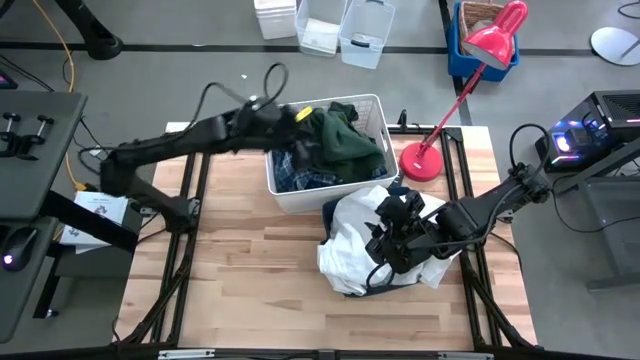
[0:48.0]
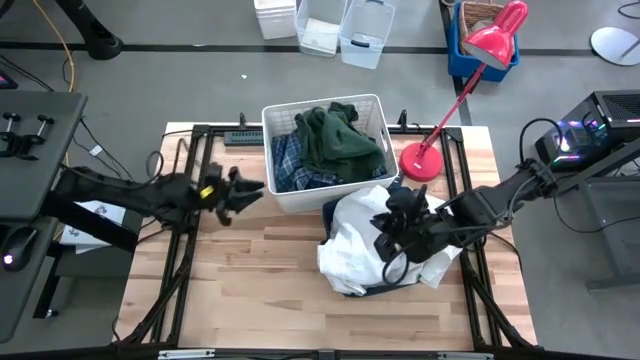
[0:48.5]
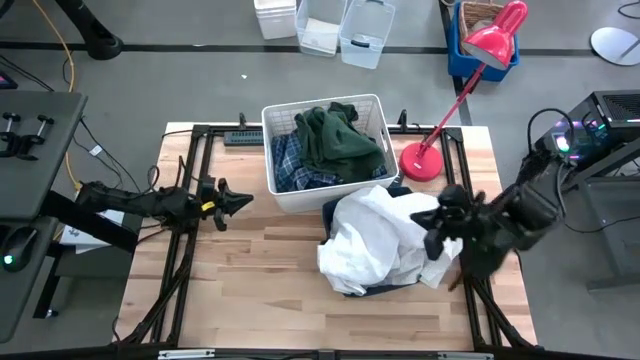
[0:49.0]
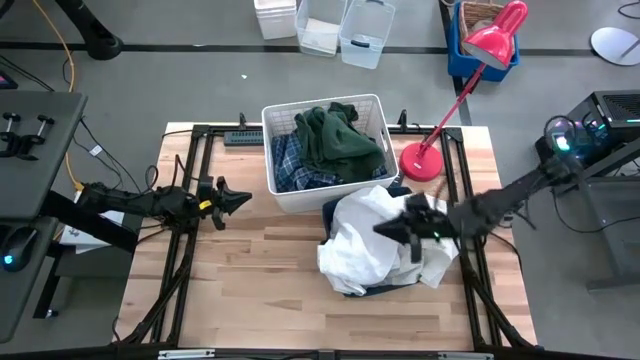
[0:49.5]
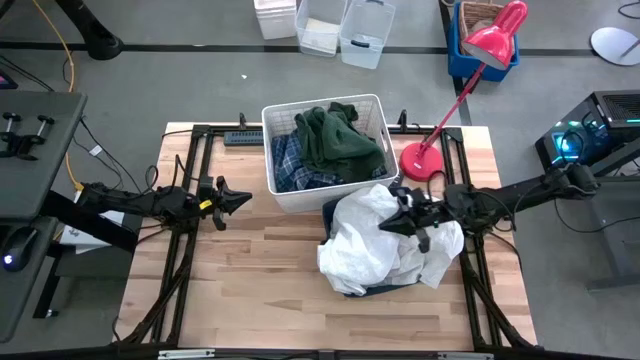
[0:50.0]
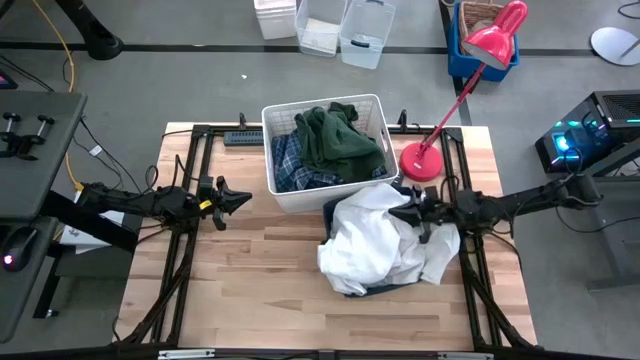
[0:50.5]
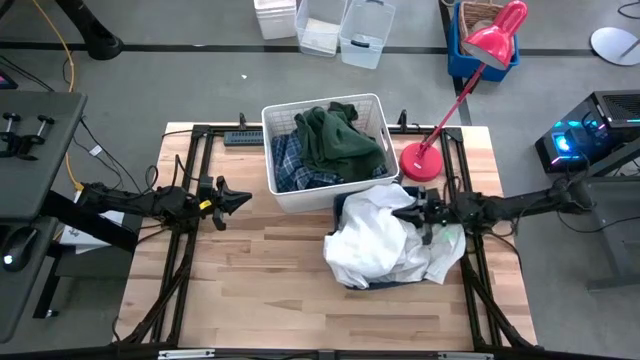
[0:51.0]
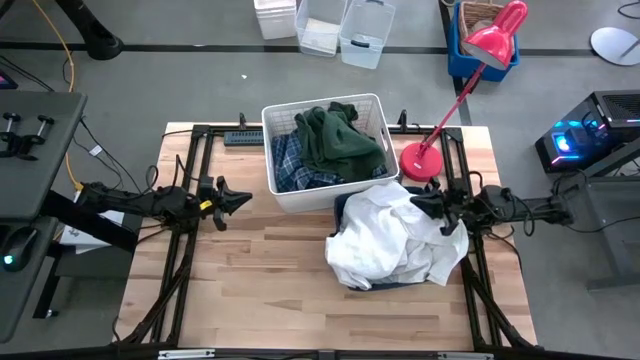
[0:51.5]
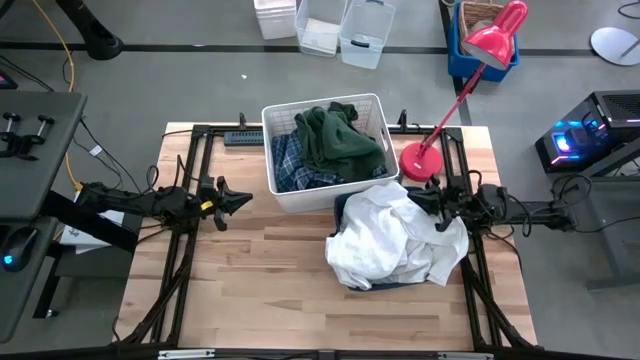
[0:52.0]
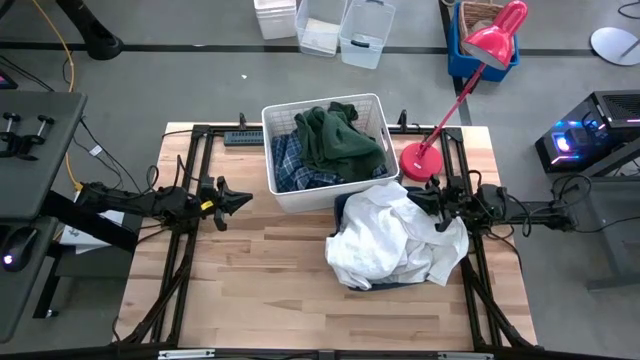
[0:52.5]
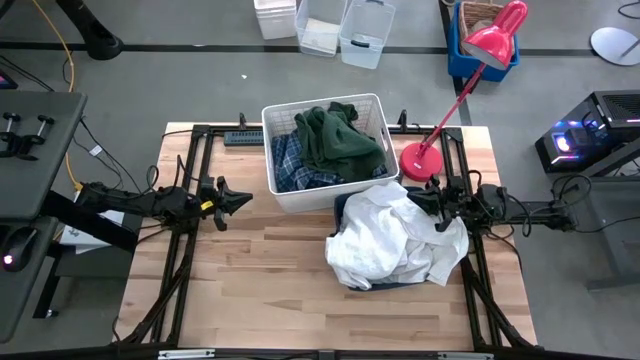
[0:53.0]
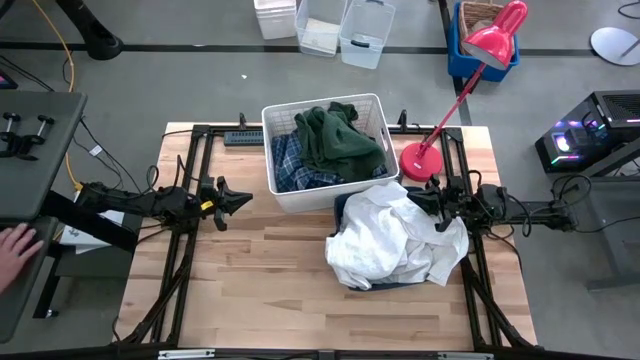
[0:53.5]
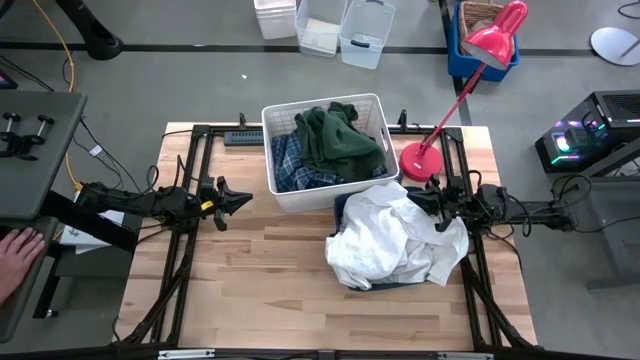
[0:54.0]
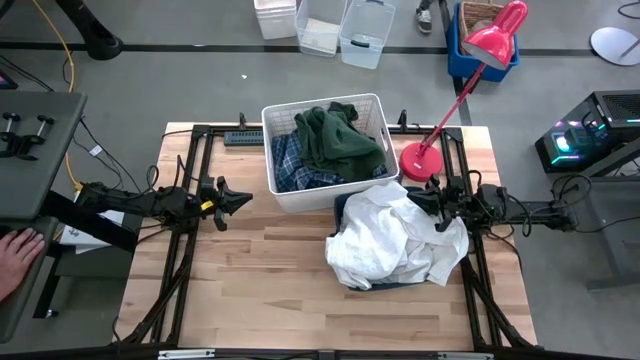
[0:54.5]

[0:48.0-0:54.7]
Task: Sort clothes
Return to Home Position

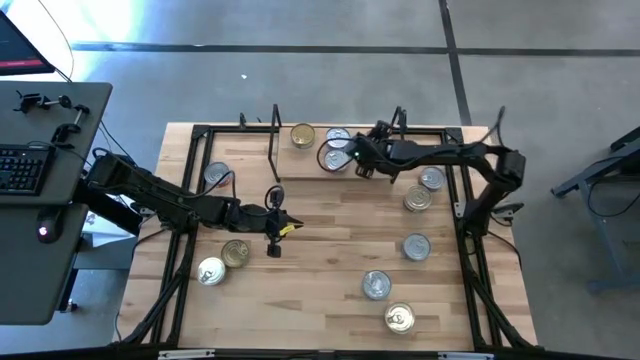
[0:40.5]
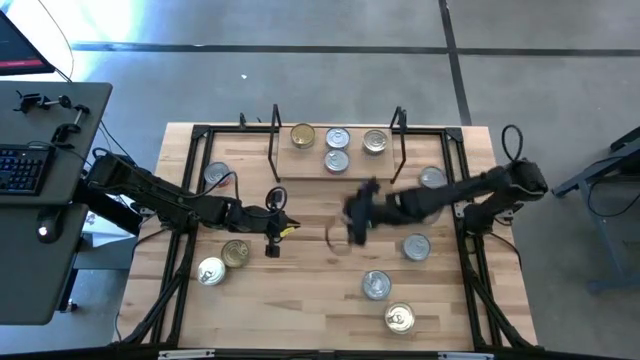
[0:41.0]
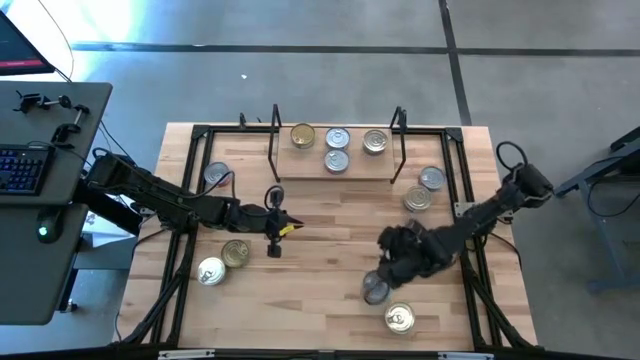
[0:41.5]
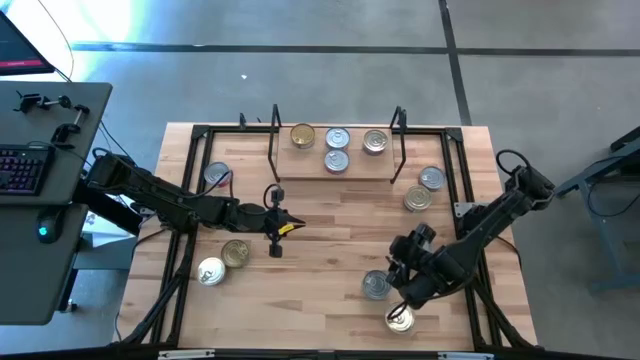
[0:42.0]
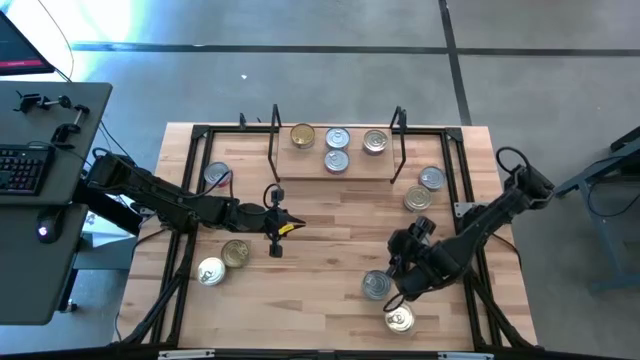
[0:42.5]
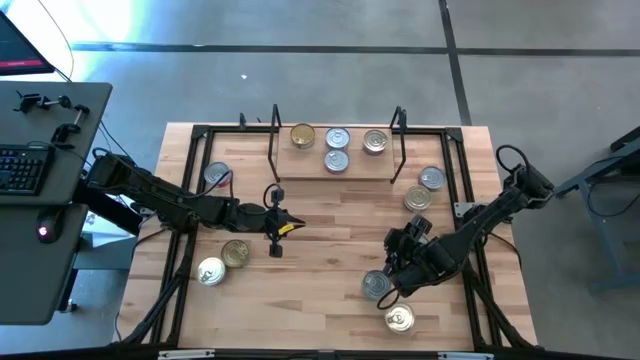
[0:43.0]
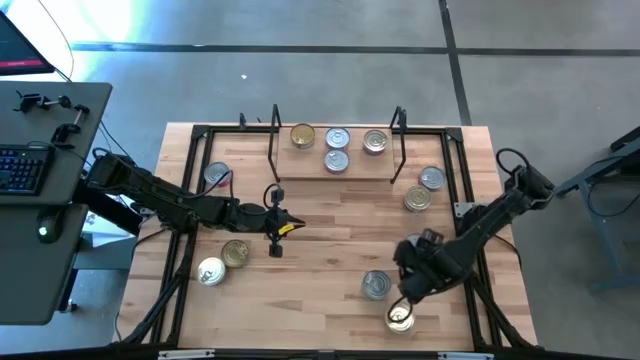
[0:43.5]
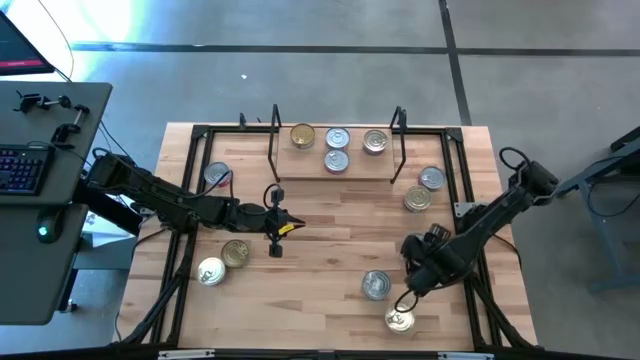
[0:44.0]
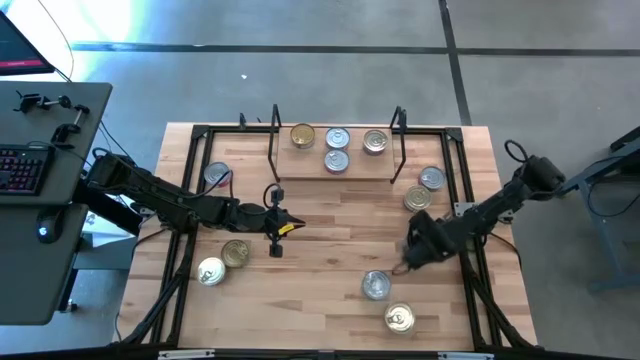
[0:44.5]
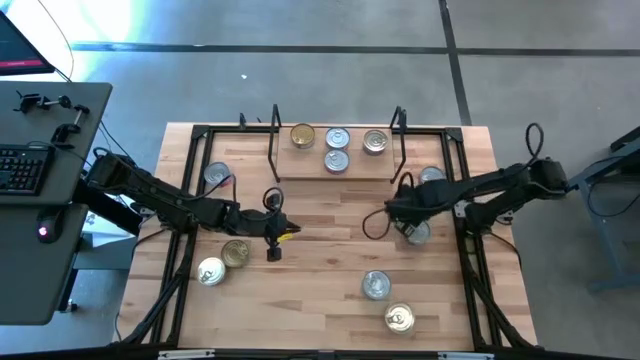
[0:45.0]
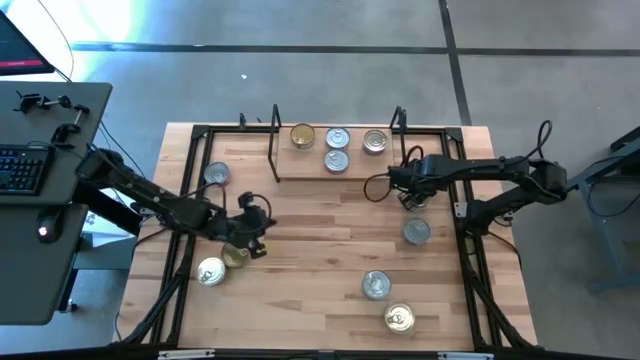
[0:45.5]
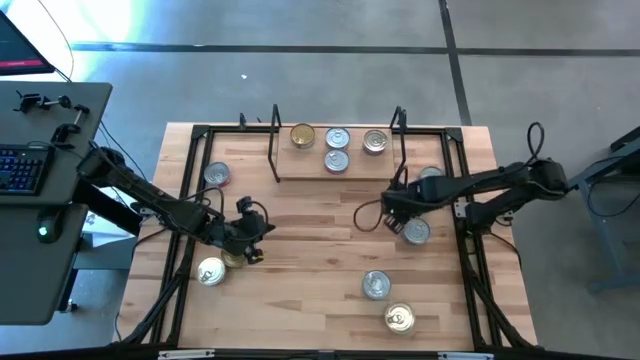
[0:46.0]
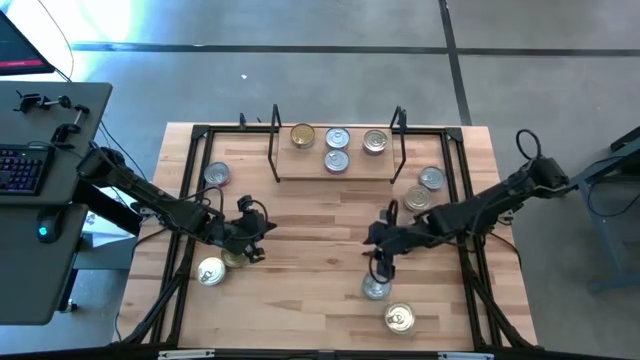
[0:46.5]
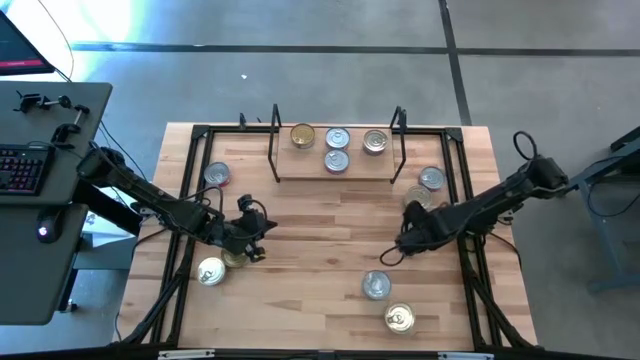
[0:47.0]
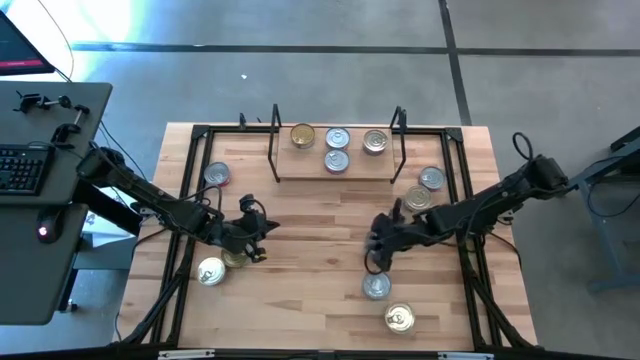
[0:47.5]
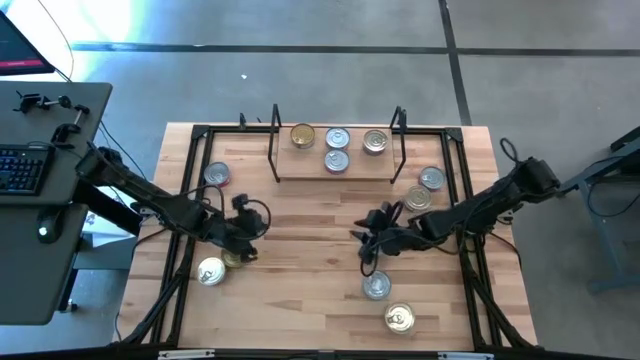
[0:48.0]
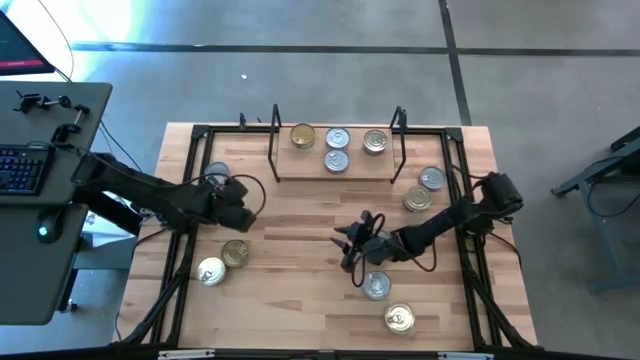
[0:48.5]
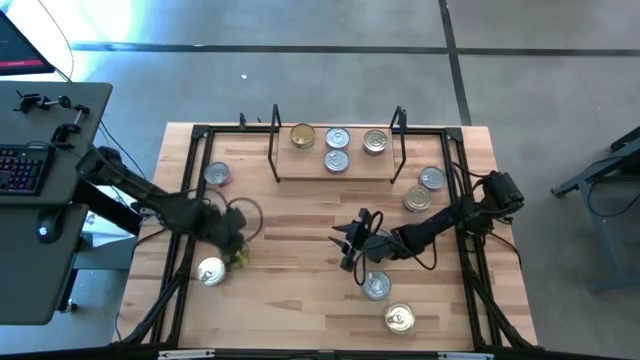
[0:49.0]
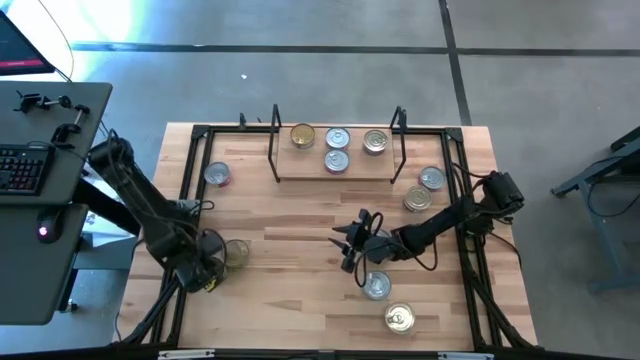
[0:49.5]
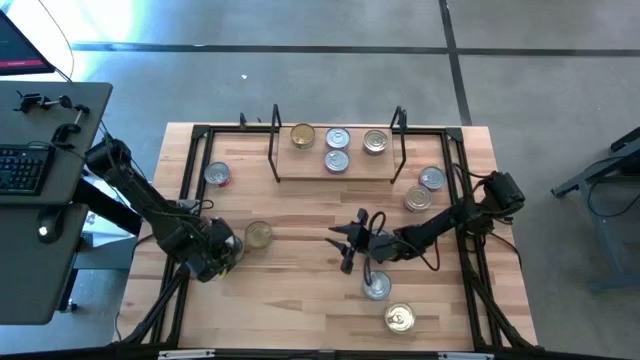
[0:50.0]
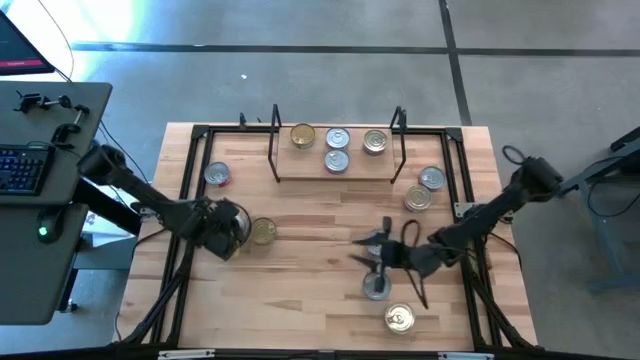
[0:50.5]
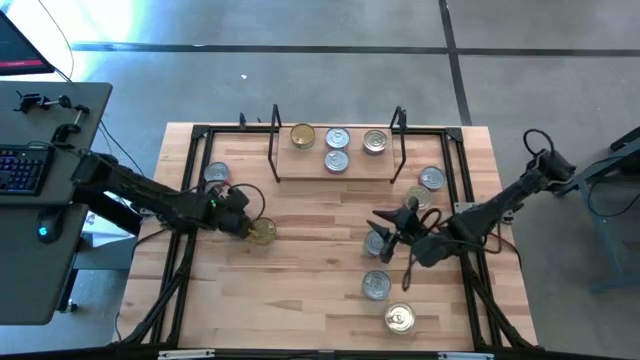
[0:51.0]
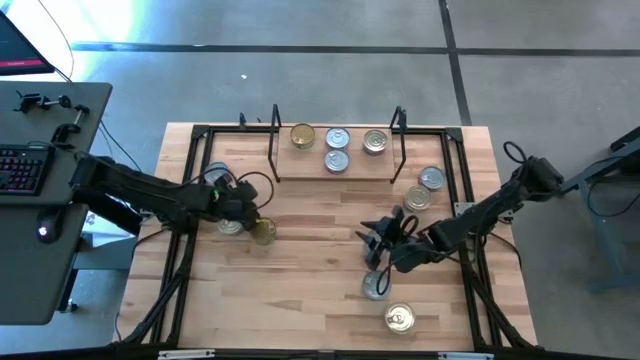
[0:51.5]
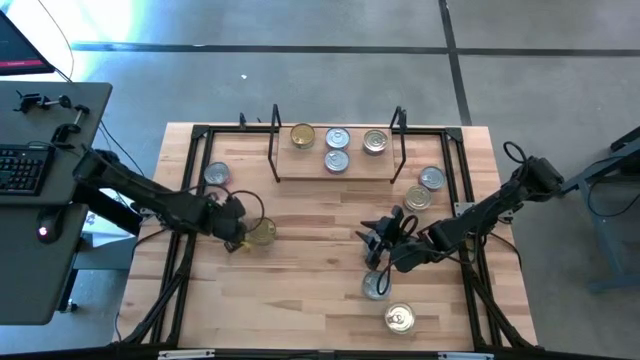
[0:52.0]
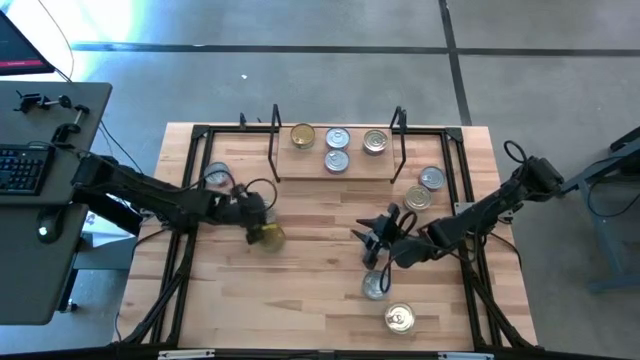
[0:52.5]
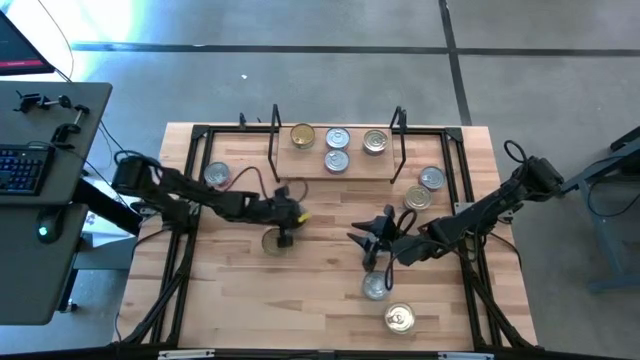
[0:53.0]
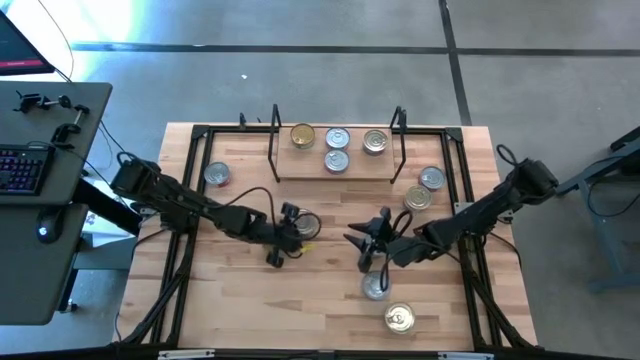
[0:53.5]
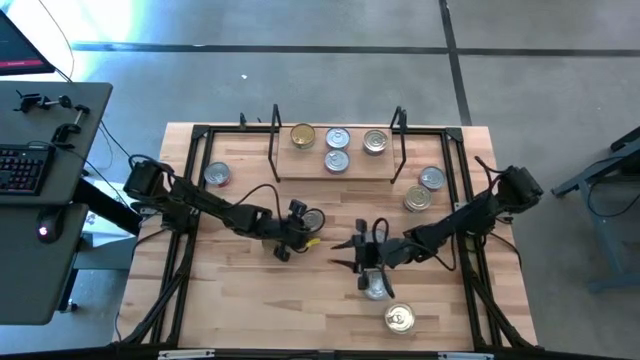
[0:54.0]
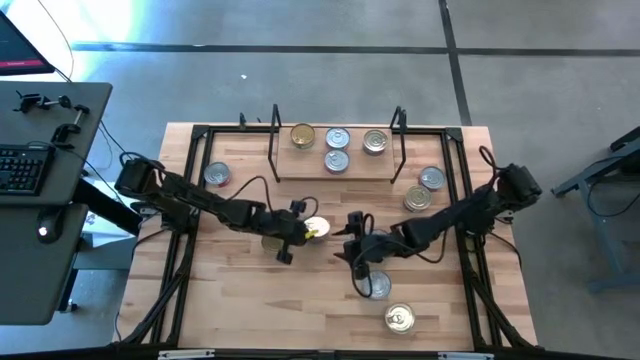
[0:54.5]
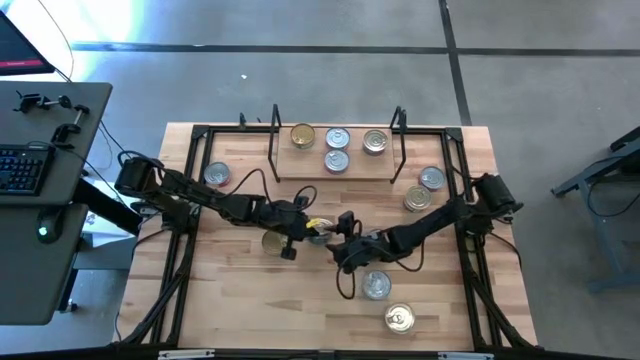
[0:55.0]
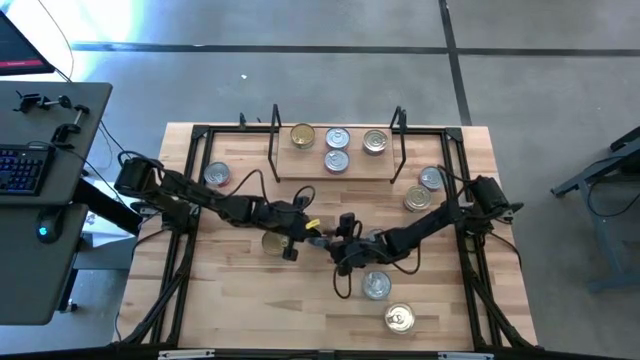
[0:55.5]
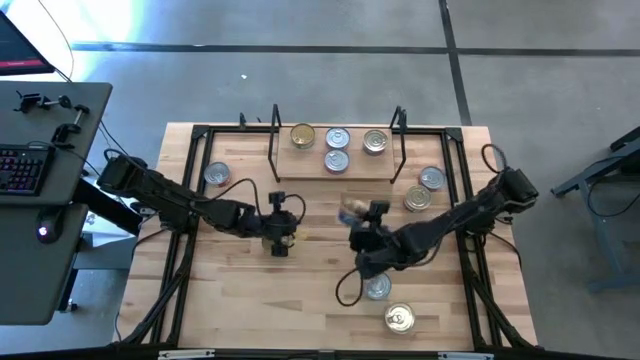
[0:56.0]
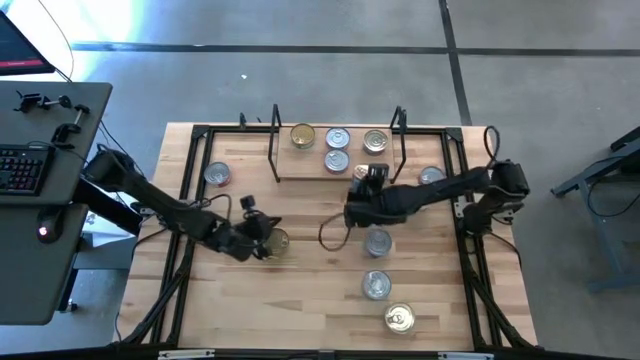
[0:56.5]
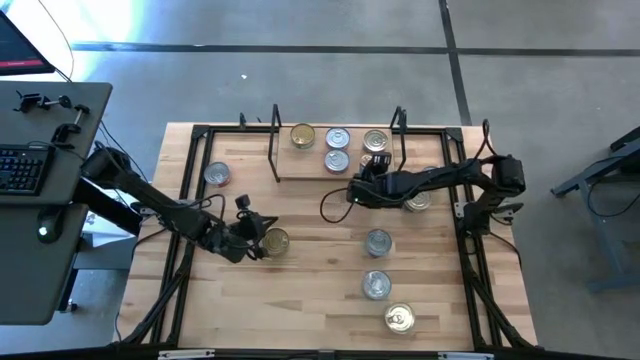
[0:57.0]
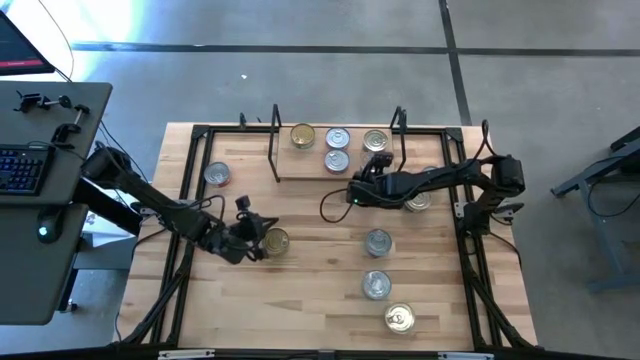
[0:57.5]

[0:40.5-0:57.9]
Task: Stack canned seafood by type on shelf
Put the blue-pink tuna can and align with the other blue tuna can on the shelf
